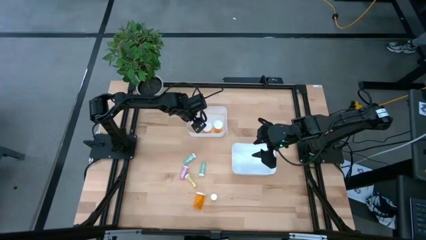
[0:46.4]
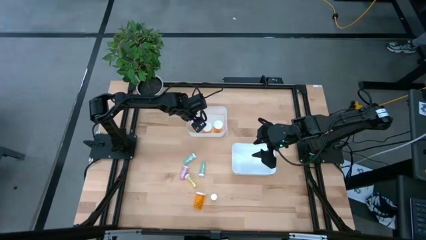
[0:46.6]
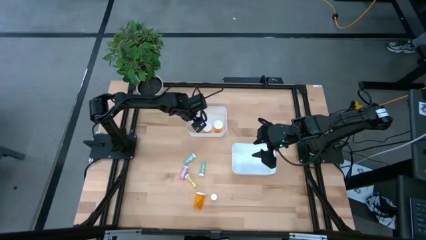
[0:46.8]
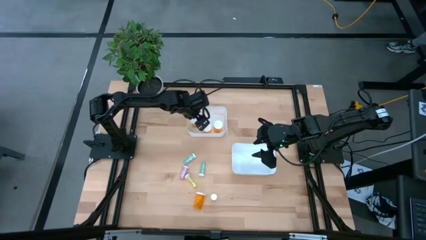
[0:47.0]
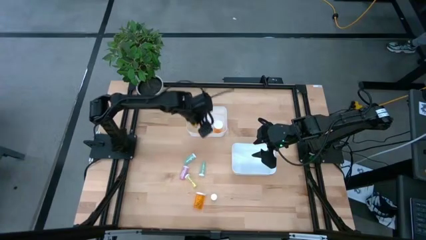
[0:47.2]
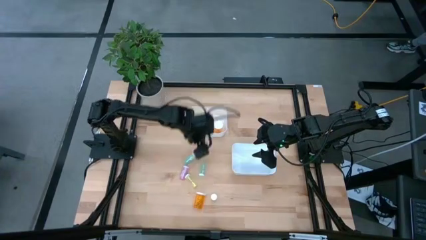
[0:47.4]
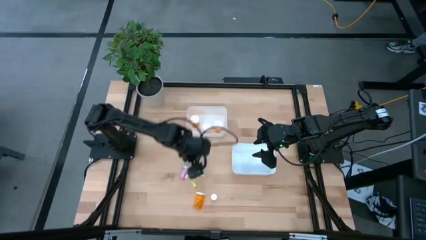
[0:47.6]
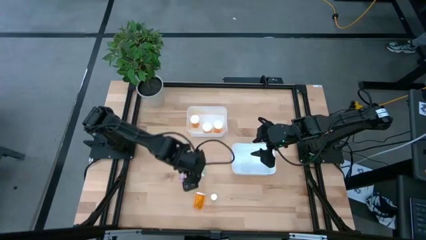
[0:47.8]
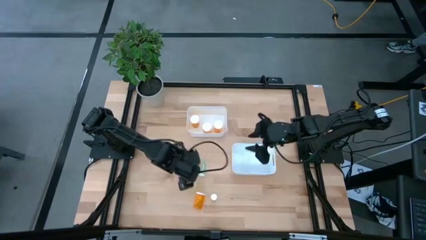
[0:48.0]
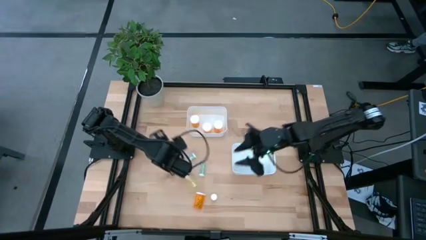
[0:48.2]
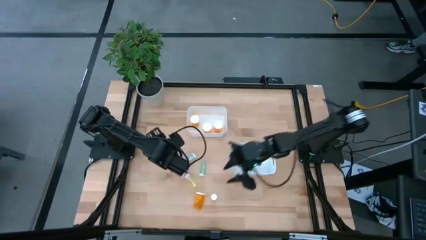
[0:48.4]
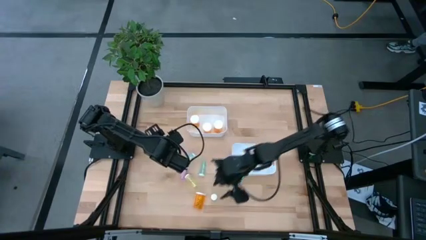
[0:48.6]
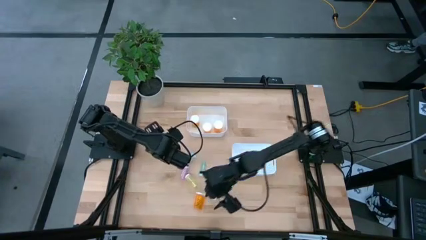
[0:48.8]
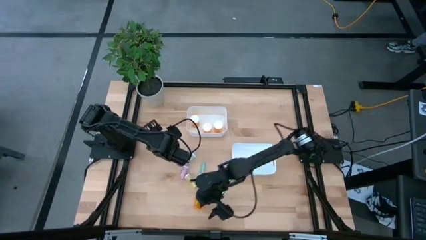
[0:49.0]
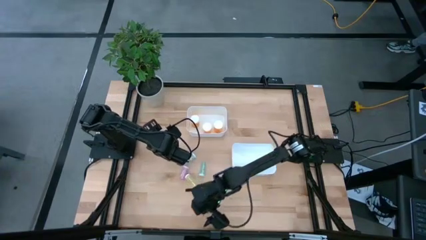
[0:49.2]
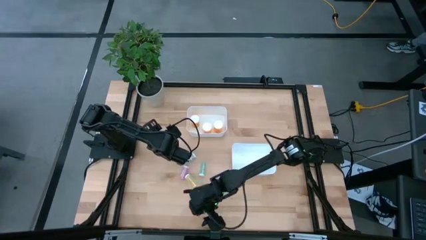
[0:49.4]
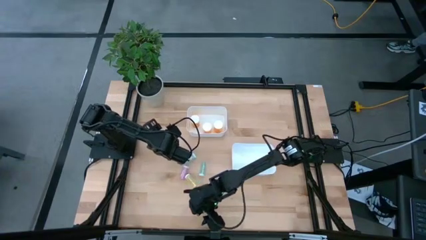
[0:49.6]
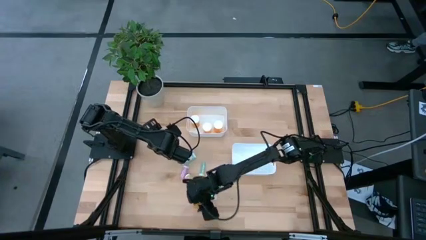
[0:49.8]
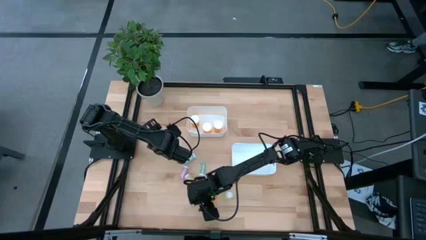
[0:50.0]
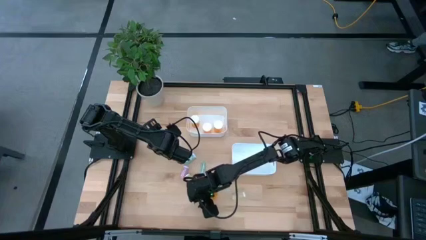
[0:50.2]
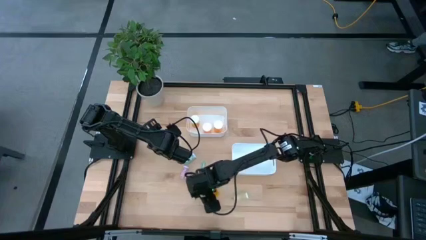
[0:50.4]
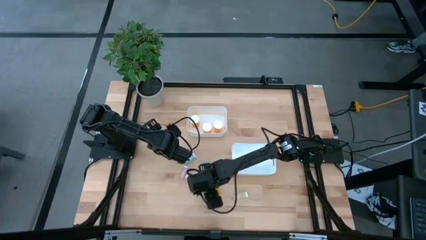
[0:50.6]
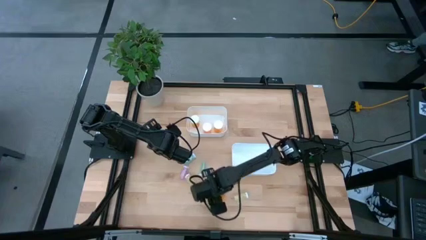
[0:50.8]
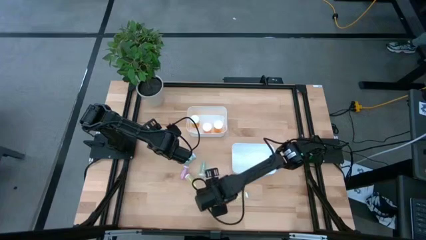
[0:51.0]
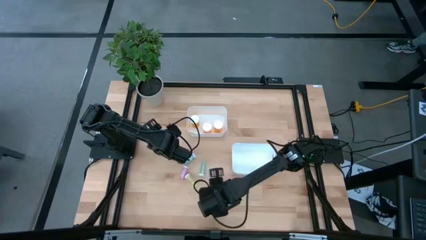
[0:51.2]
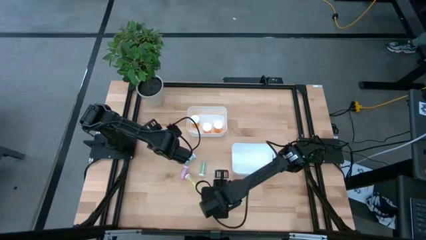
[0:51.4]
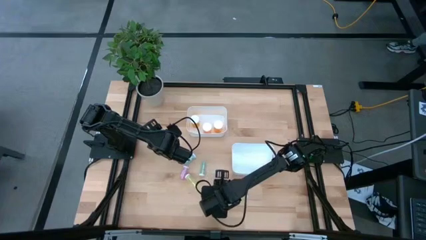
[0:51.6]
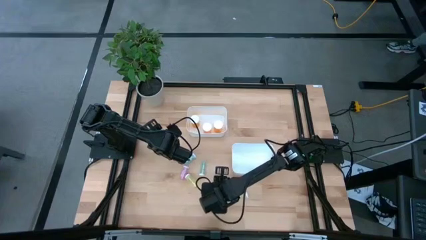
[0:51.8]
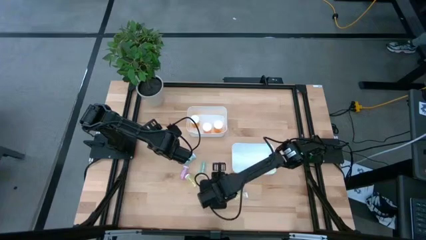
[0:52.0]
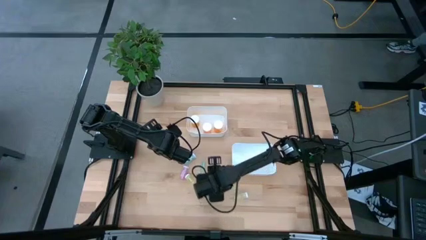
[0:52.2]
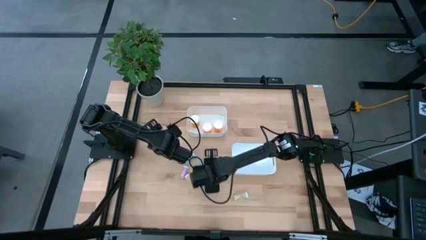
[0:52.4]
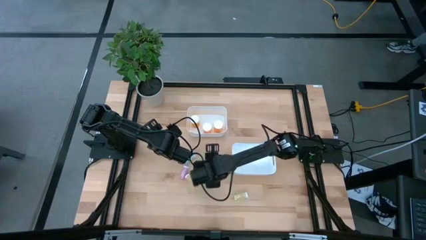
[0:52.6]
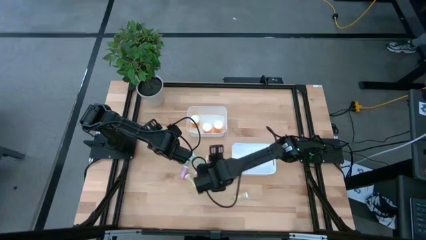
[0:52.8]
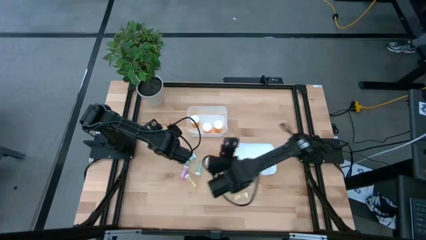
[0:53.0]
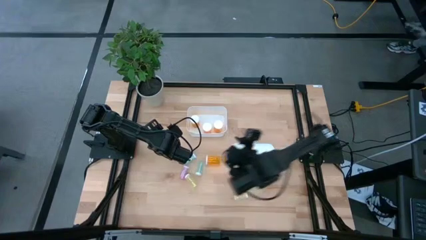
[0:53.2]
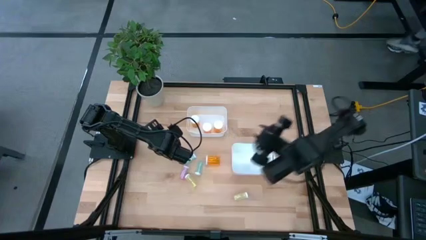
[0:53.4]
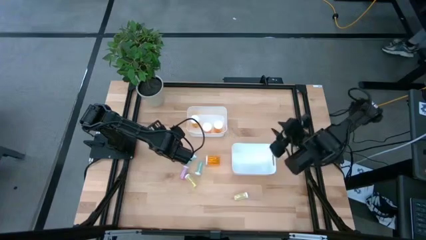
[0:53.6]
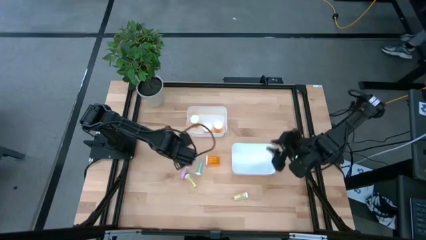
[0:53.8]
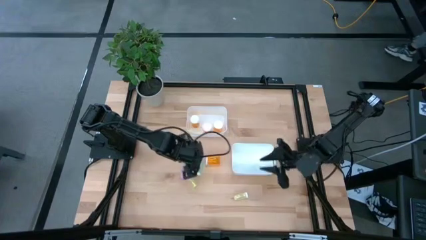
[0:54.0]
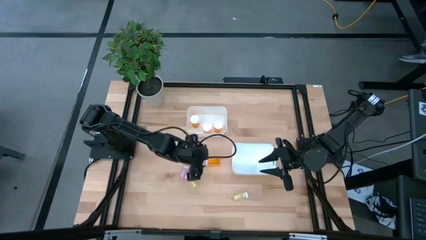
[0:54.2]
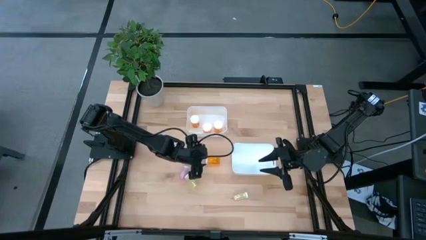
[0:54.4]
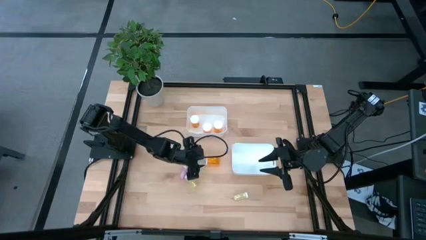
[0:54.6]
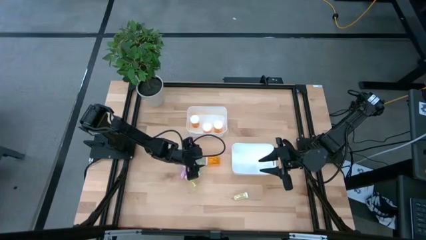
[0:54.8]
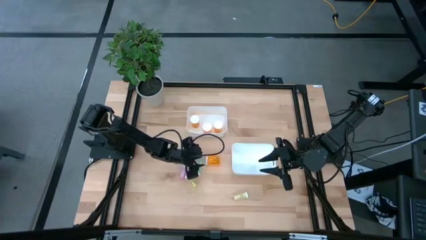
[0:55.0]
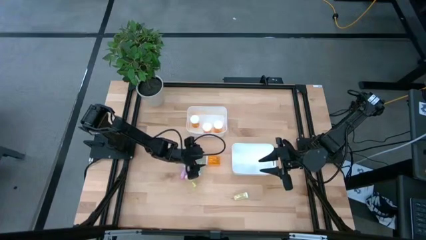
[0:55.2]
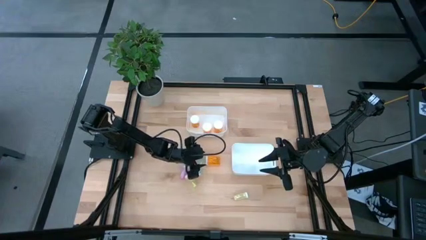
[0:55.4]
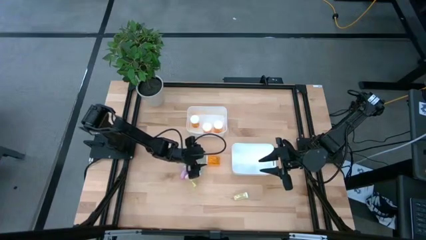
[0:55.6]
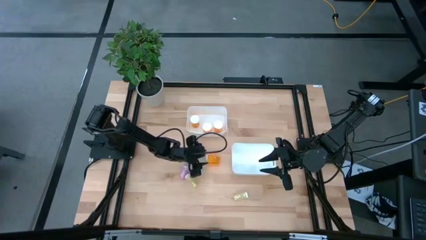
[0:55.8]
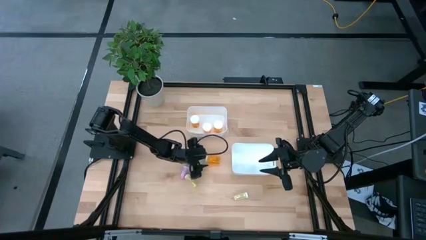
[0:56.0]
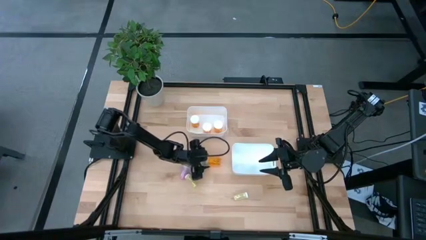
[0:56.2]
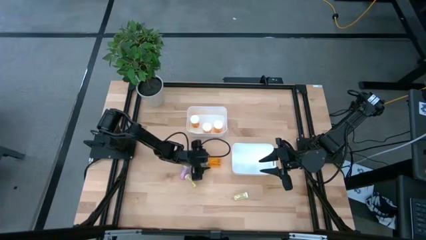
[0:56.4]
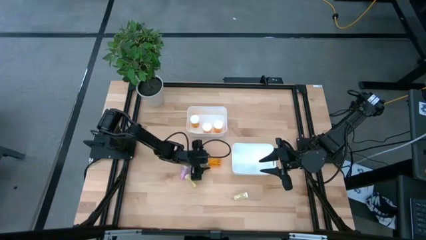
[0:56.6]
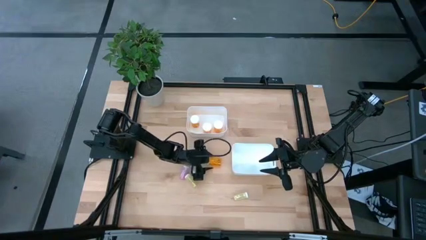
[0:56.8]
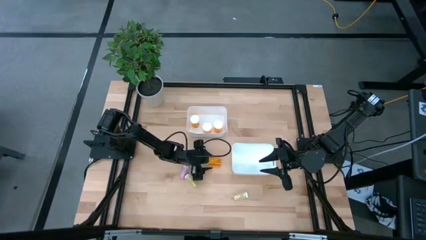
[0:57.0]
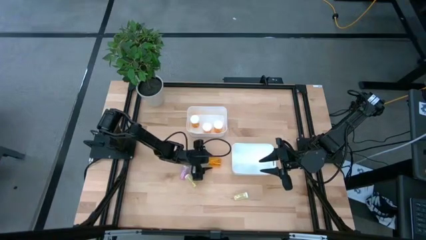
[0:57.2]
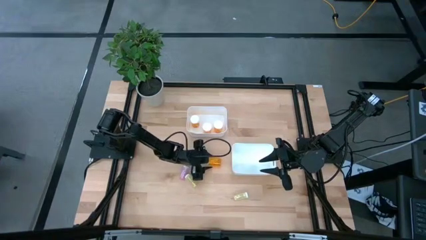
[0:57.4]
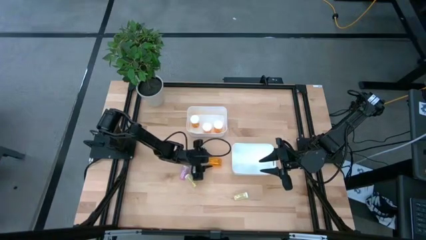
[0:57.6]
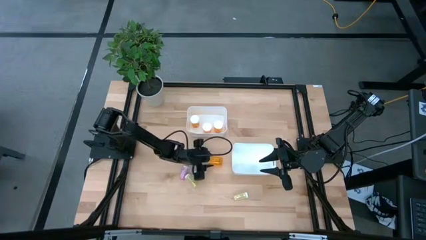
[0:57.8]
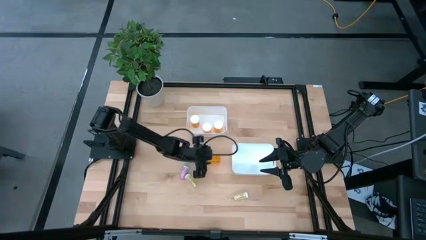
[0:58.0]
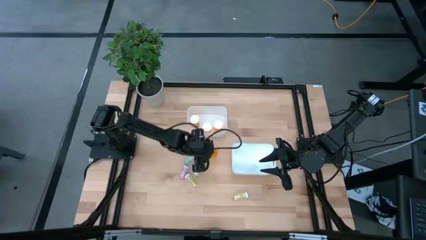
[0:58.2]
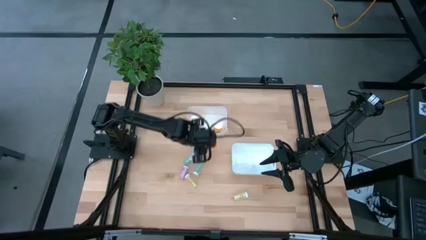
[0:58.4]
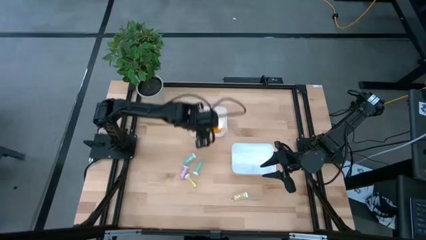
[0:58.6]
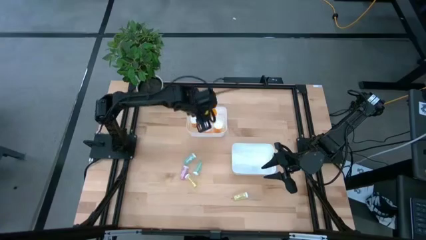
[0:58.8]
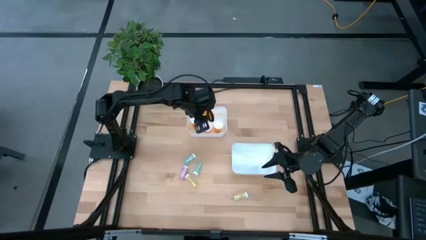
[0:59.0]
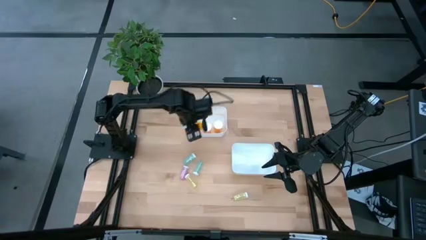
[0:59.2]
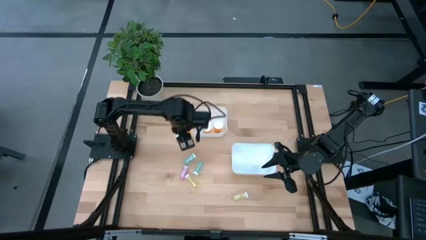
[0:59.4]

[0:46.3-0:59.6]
Task: Pick and place medicine bottles into bin by pill shape (circle, oval)
Put the large orange pill bottle into the top white bin

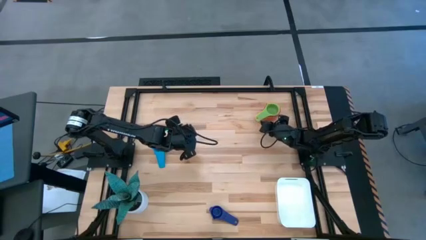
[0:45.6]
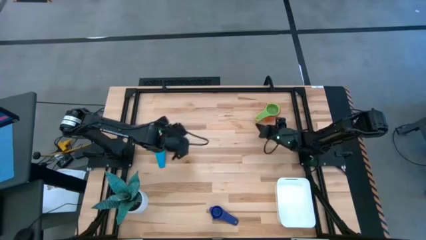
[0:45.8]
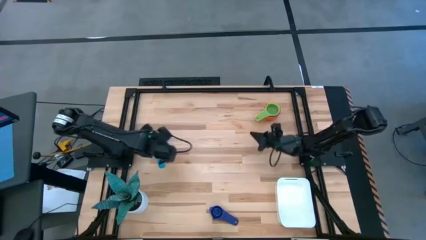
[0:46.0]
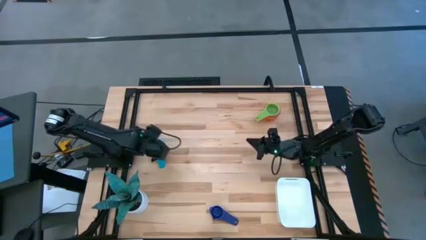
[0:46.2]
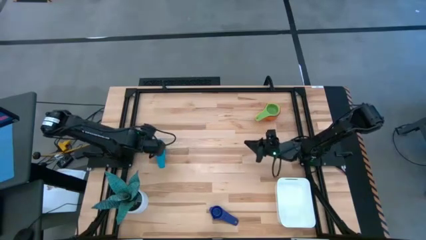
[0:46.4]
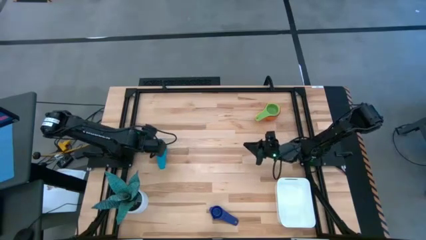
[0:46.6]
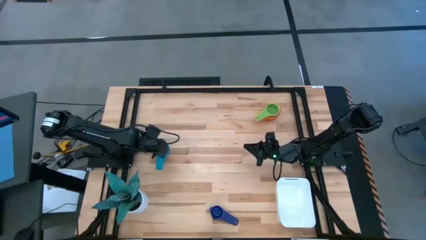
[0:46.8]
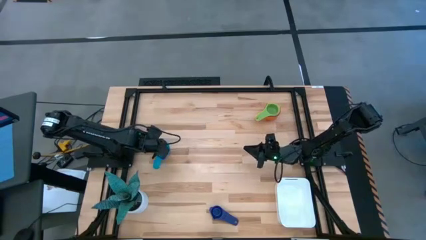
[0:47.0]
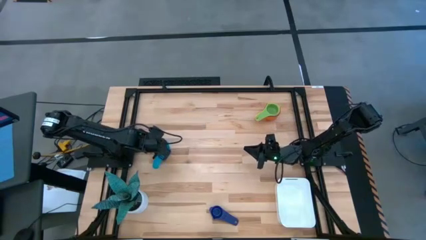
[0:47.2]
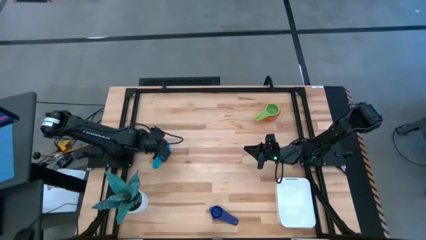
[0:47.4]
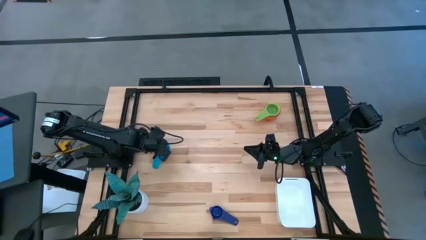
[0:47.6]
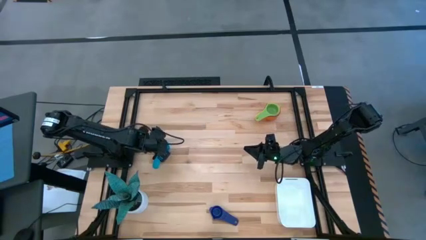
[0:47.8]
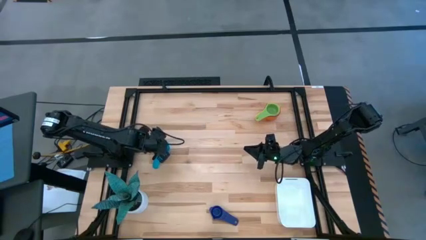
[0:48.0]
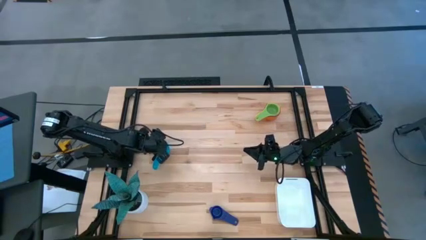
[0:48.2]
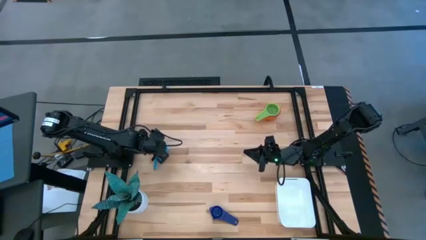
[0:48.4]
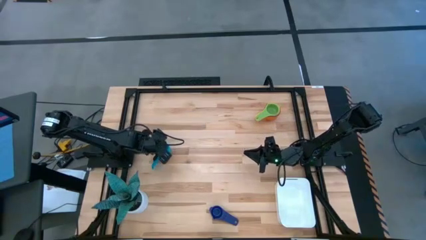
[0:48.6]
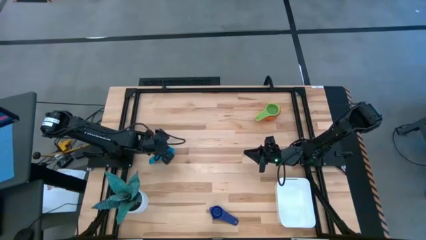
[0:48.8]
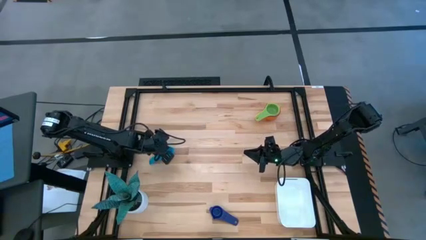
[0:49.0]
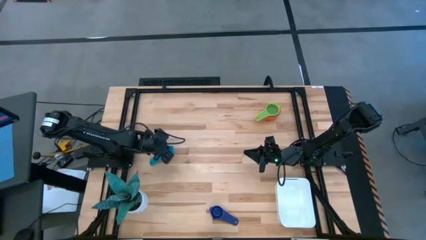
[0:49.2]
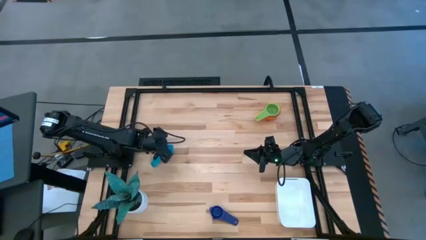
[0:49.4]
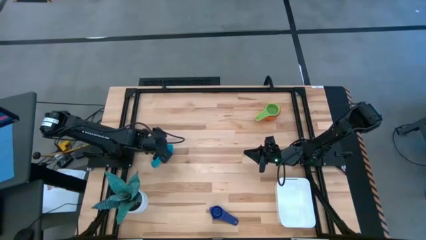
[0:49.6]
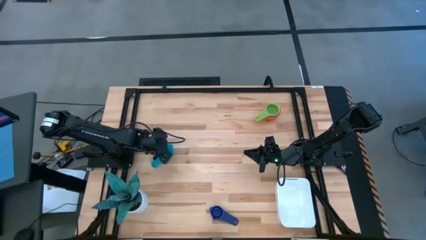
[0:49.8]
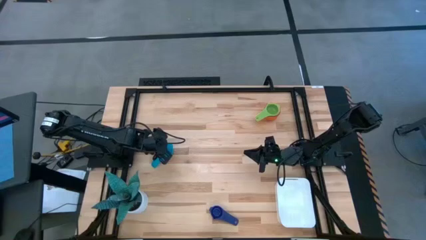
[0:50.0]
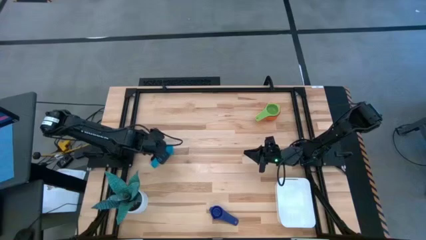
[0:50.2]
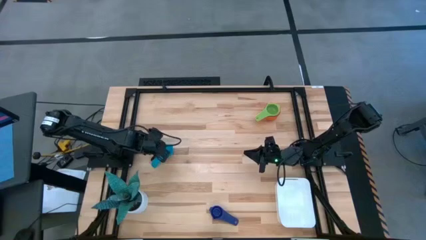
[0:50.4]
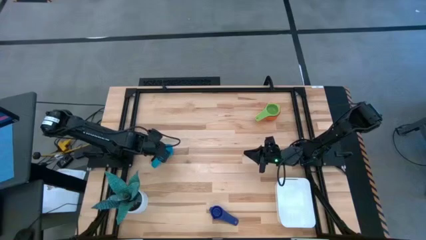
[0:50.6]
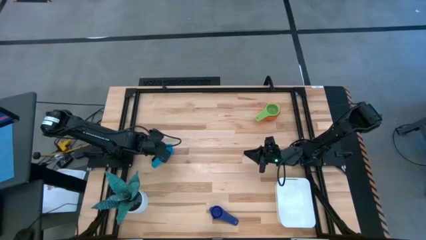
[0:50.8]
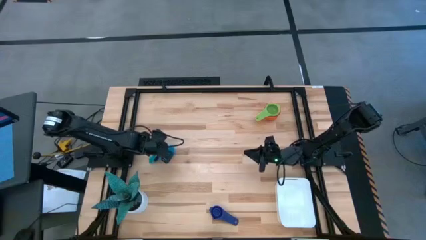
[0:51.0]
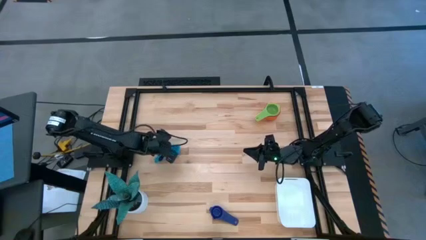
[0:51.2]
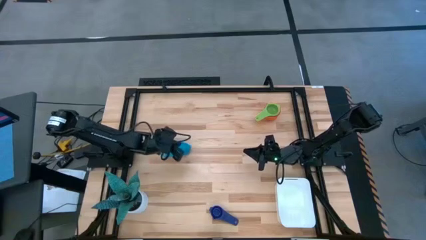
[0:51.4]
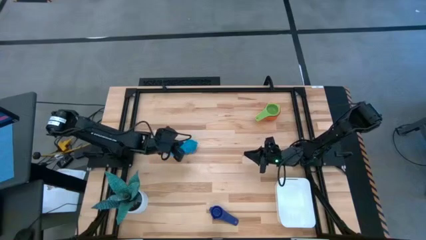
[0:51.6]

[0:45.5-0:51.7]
Task: Nest measuring cups in basket
Stack the light blue measuring cup on the green measuring cup
